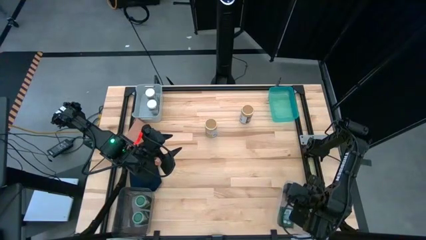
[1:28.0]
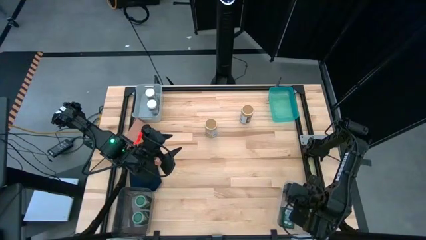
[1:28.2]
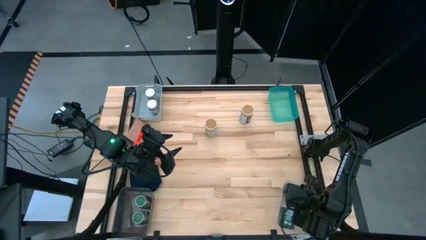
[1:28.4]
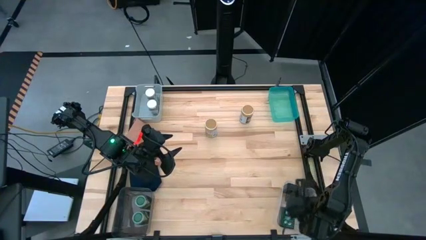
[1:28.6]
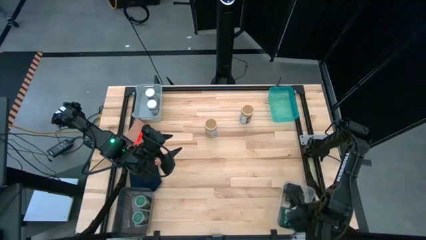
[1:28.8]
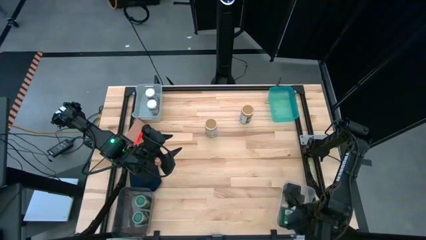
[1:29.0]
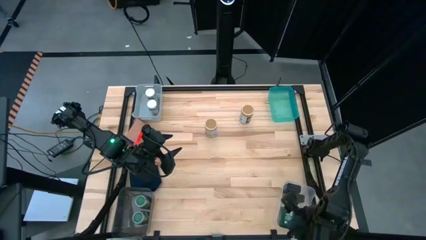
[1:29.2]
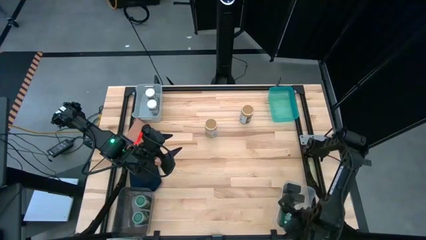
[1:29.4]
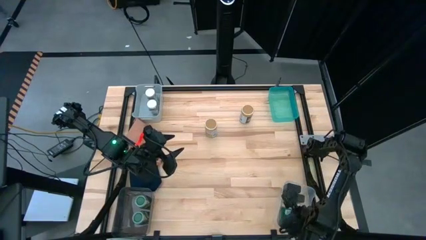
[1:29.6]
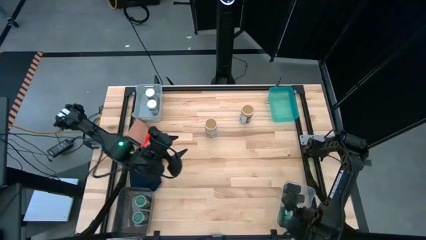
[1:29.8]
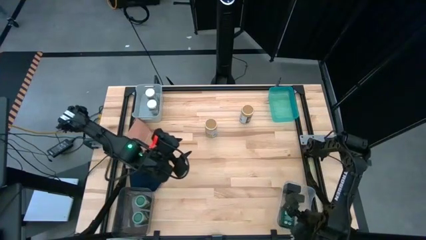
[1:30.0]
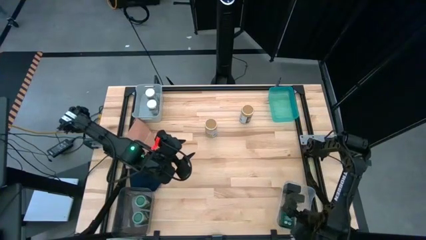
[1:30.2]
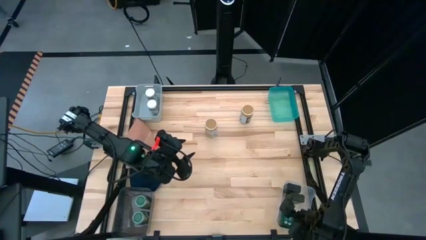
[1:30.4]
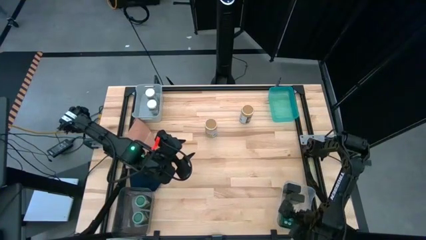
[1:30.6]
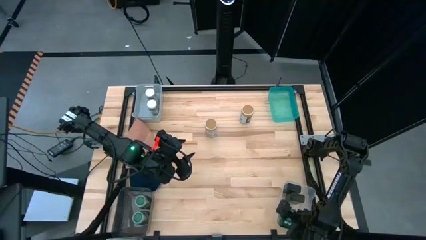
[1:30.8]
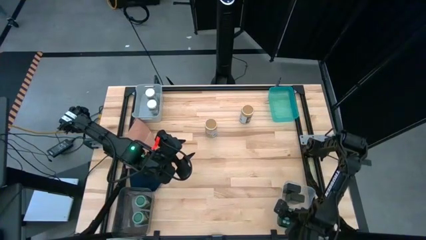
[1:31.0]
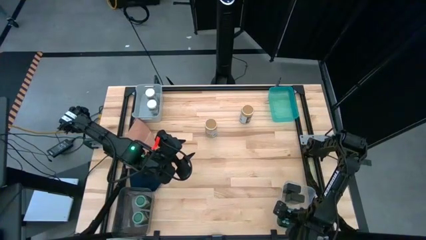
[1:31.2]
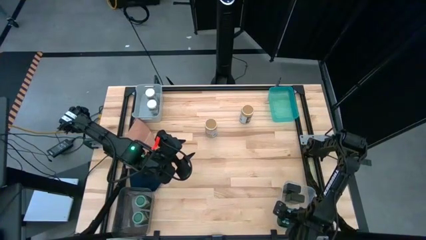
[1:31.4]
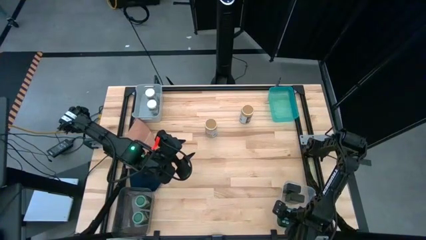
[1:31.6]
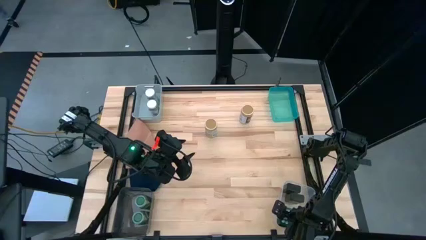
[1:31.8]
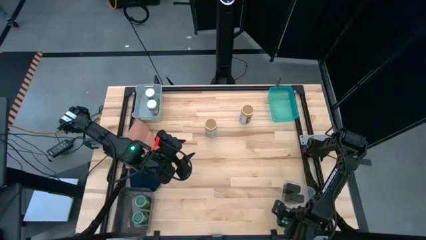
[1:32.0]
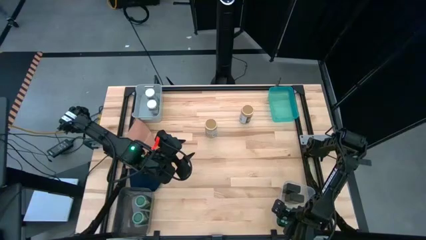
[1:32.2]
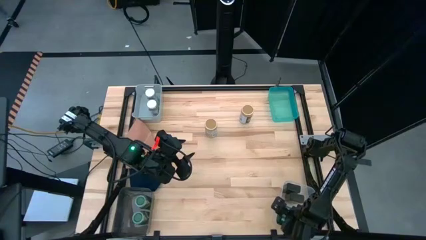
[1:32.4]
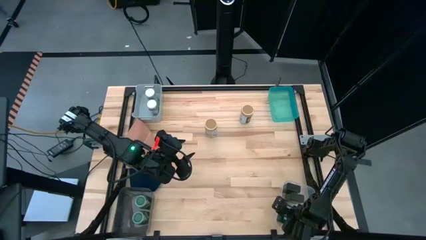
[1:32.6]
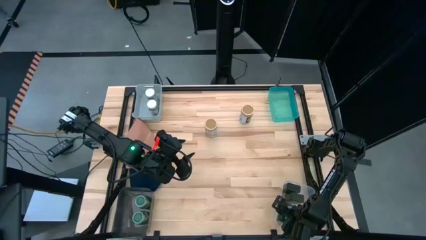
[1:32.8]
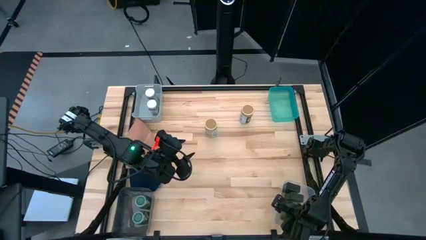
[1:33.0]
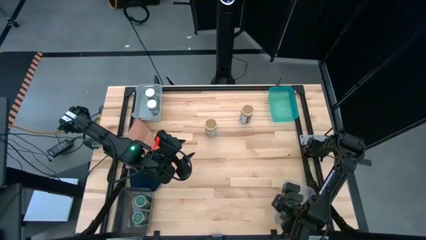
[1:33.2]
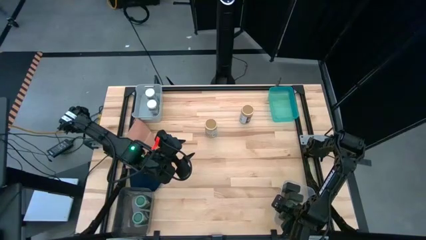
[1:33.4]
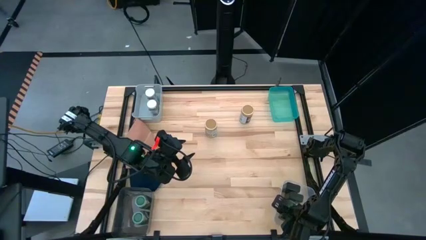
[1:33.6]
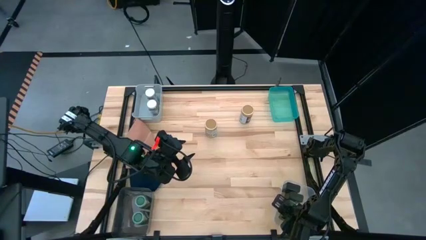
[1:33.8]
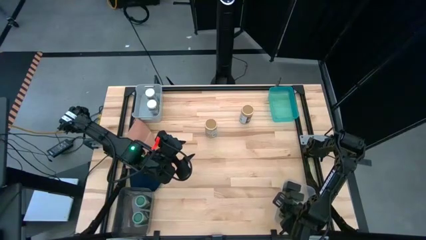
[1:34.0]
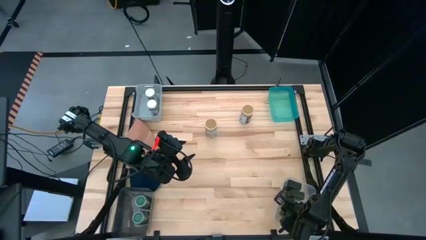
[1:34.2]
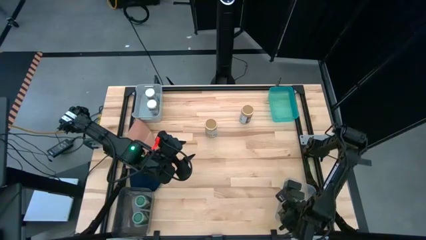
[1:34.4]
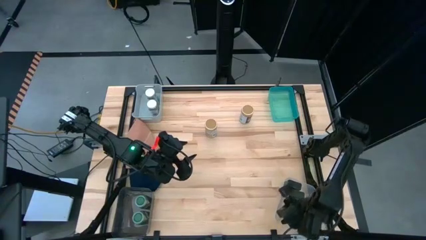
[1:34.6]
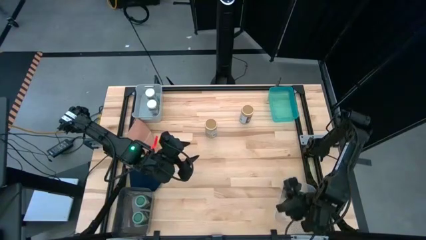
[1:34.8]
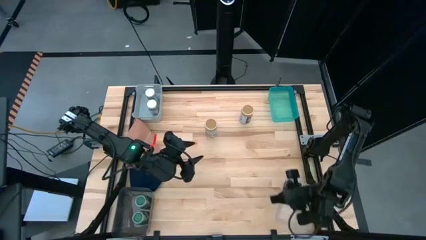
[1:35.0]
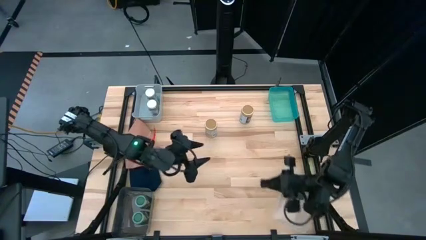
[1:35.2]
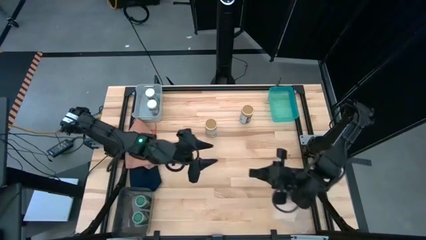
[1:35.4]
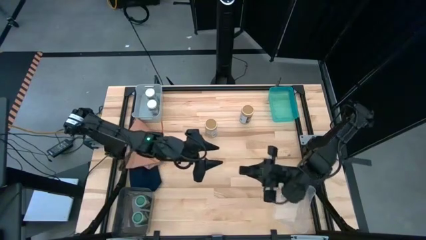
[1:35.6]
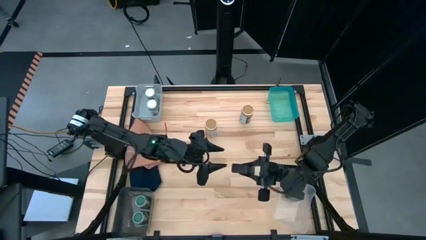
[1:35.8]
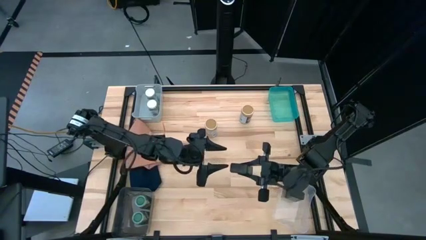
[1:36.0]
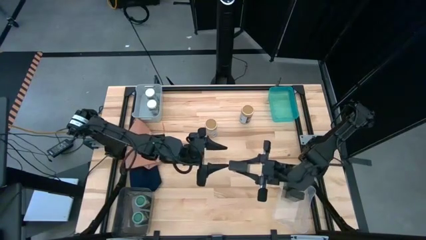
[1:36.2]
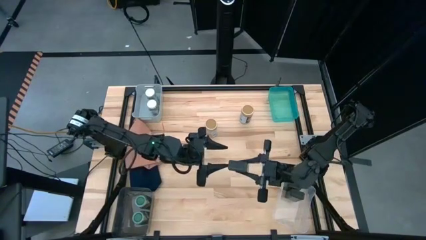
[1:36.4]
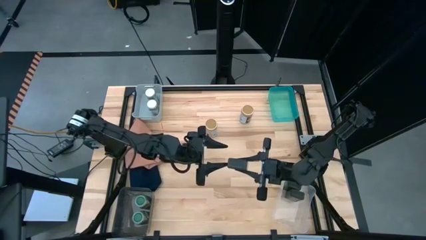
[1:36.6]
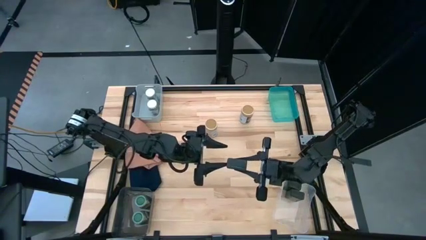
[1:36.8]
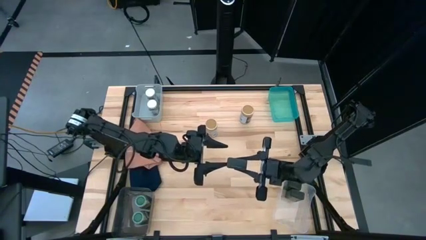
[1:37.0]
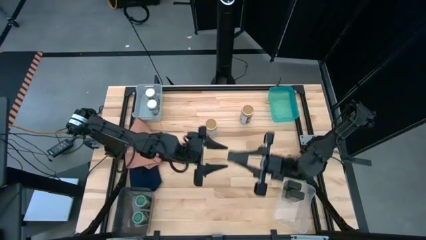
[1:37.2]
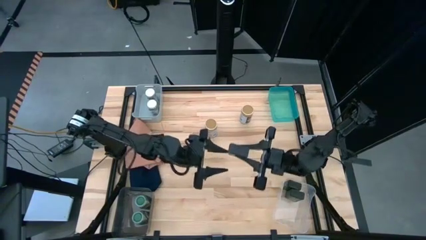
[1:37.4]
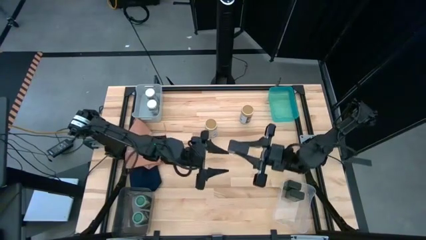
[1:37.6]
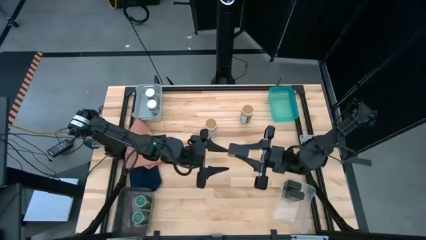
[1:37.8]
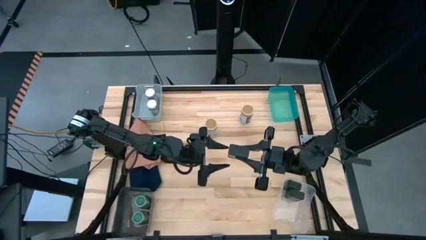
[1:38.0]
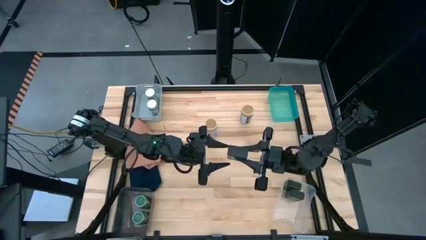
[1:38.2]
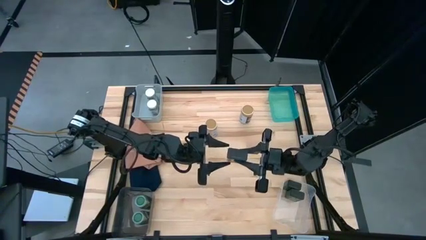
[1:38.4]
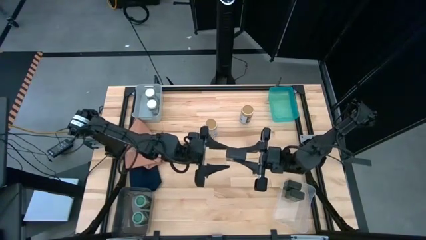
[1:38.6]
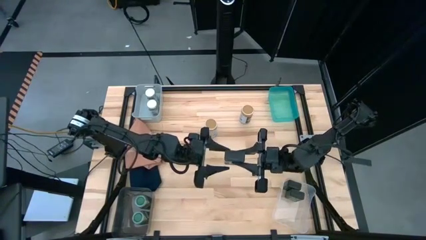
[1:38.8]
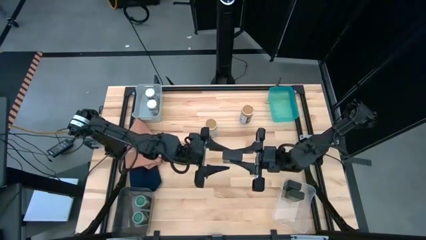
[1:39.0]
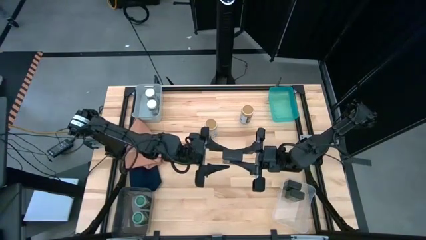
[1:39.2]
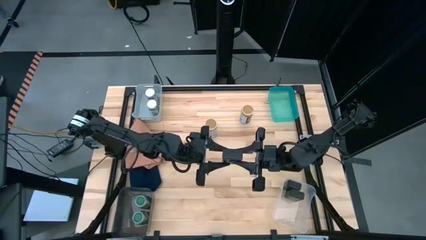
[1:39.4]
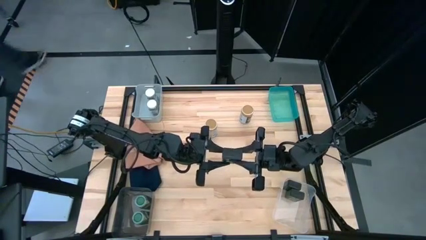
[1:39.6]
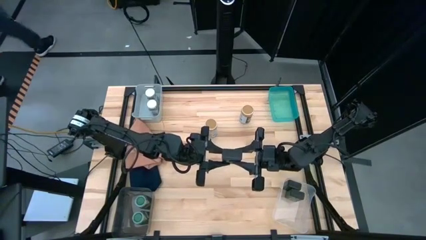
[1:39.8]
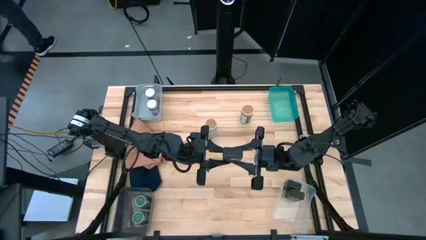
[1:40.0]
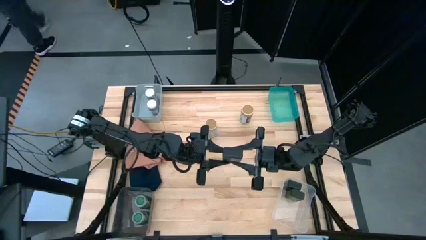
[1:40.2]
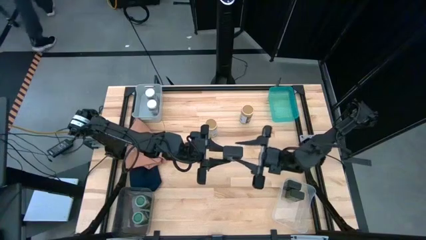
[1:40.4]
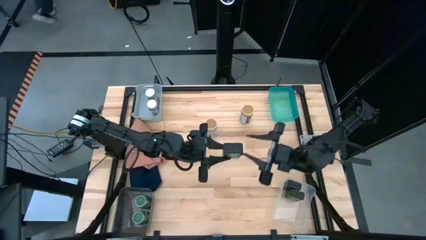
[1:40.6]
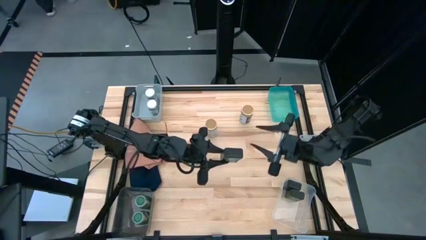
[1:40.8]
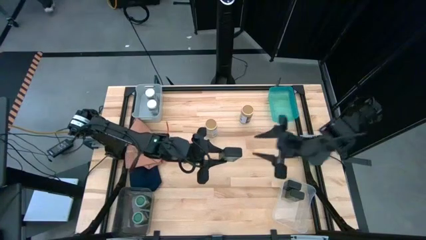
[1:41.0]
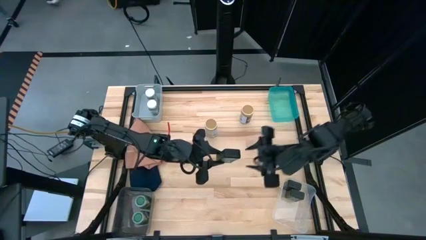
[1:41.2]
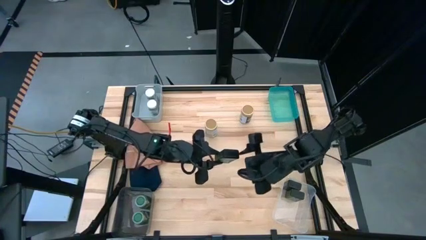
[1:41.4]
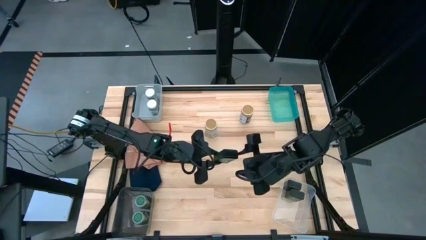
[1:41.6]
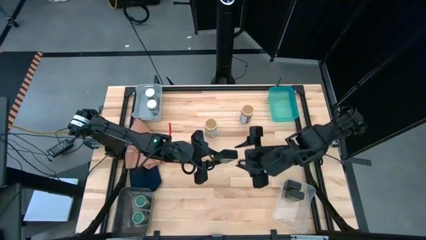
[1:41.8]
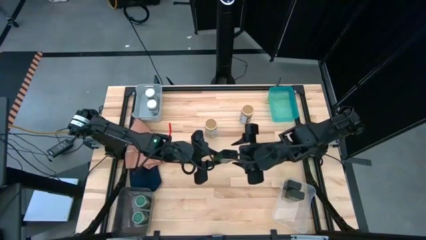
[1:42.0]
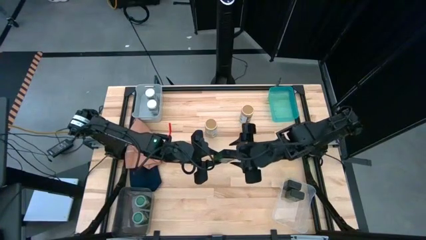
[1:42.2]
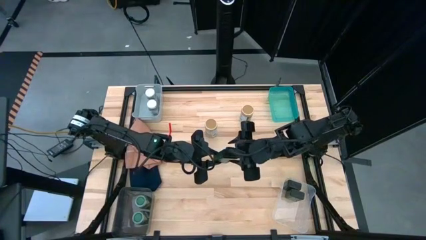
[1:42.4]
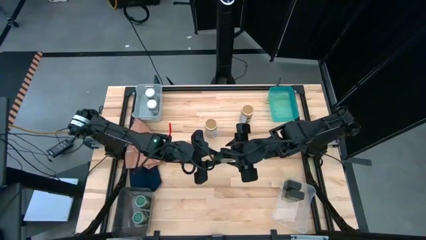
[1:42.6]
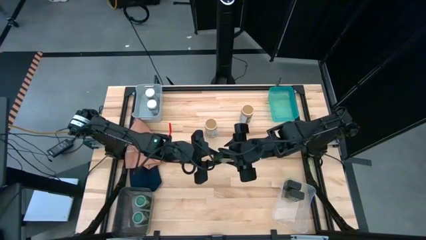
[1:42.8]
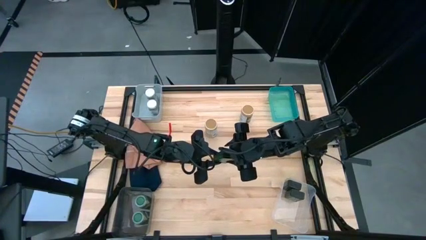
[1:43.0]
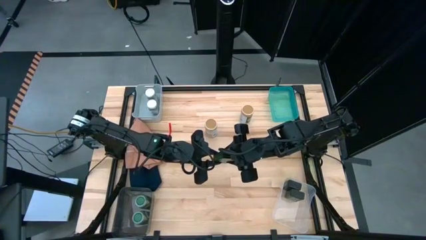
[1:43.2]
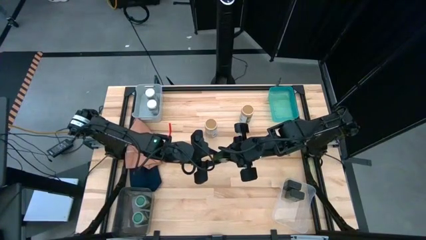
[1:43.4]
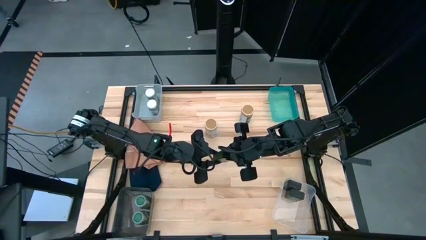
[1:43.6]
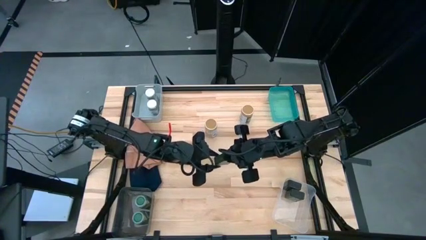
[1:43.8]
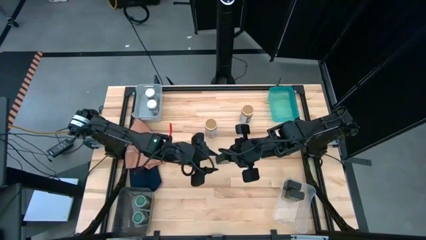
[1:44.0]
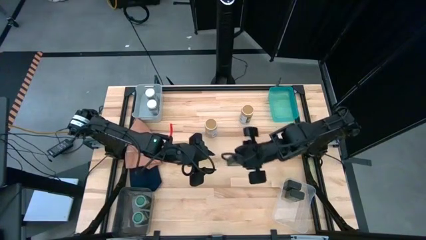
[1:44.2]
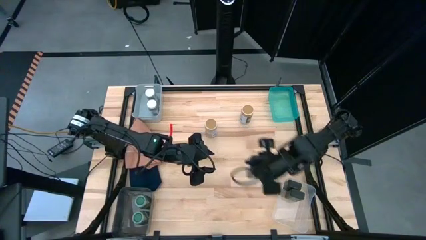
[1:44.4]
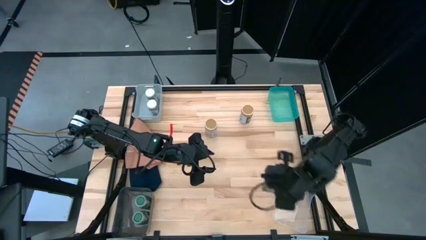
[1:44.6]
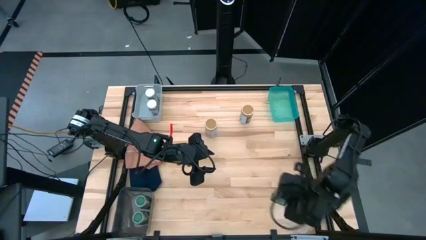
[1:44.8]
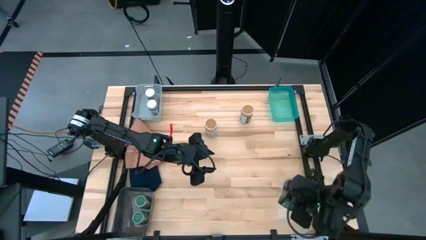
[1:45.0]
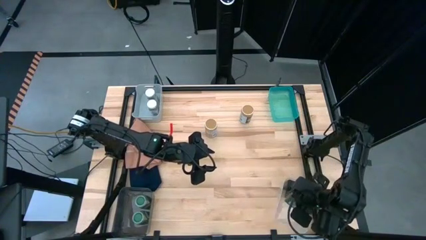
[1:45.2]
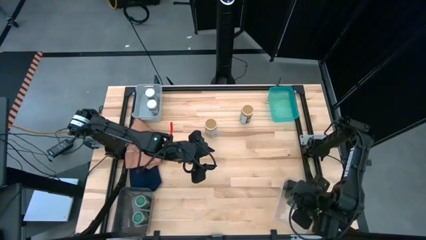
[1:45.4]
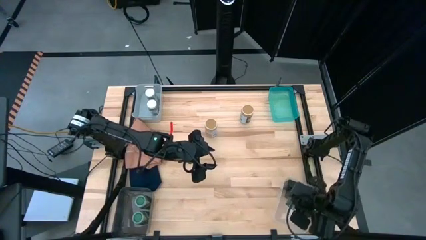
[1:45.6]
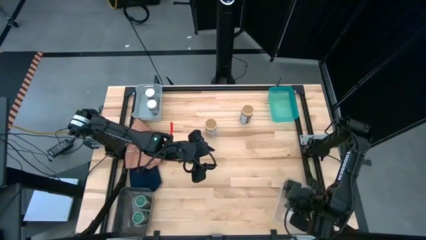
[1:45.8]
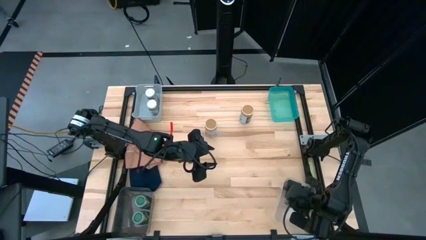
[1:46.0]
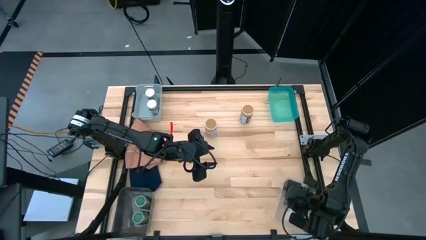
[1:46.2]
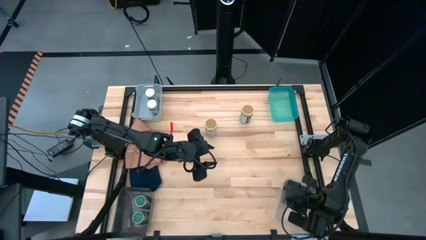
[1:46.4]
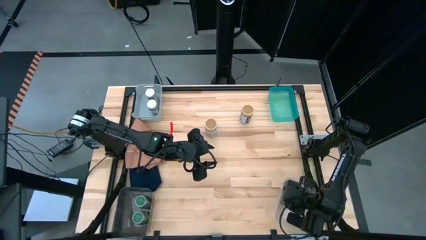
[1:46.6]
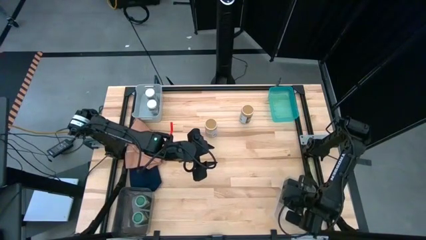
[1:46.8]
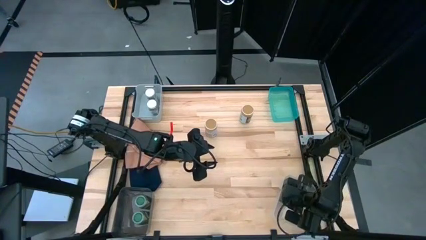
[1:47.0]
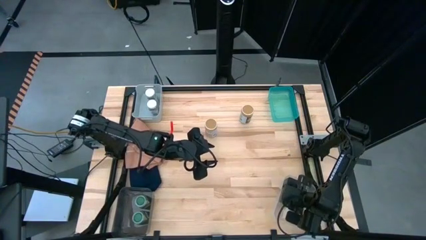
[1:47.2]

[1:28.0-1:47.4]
Task: Sort spices by type
Put the black spice can into the transparent bin
